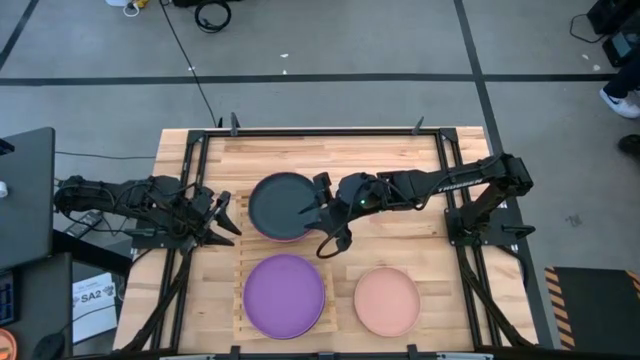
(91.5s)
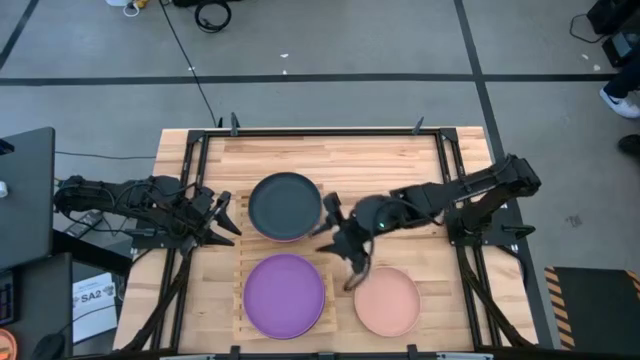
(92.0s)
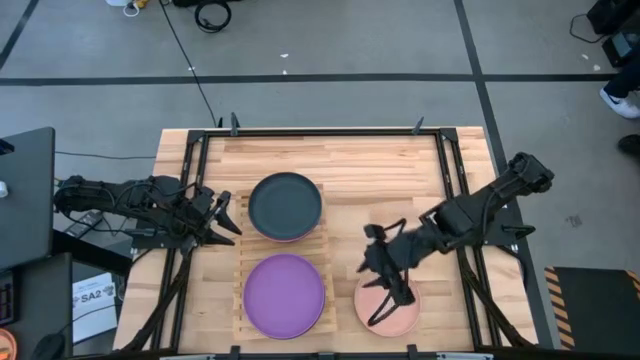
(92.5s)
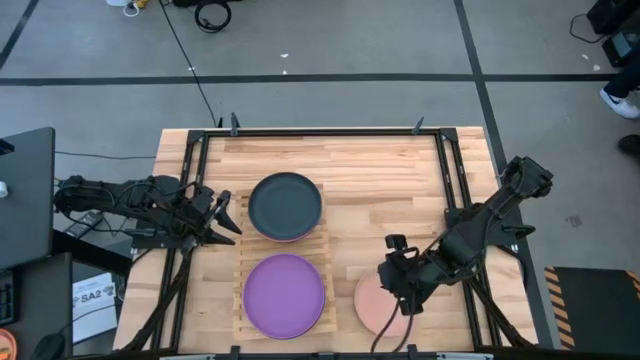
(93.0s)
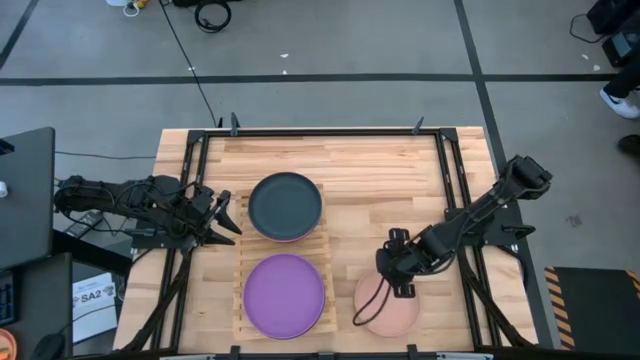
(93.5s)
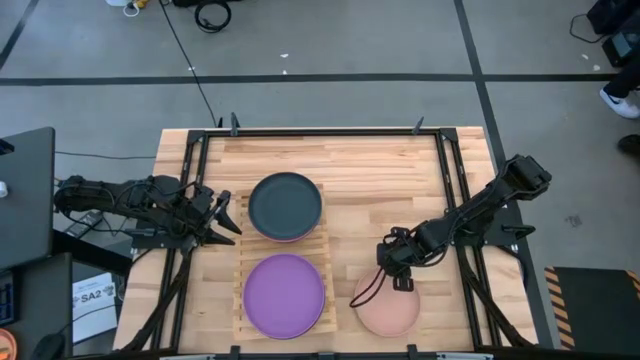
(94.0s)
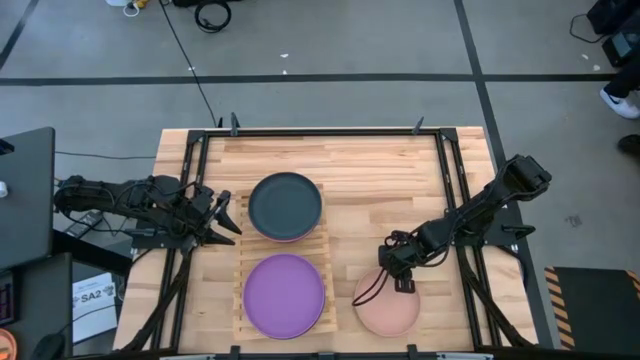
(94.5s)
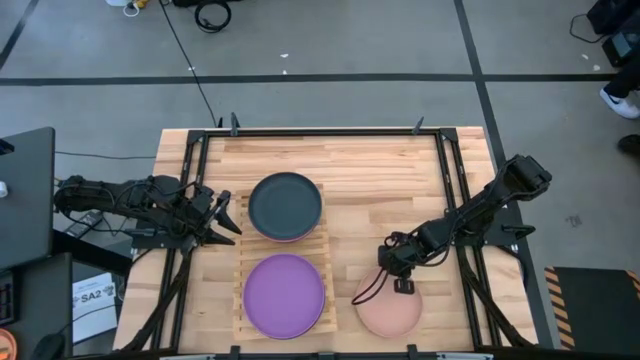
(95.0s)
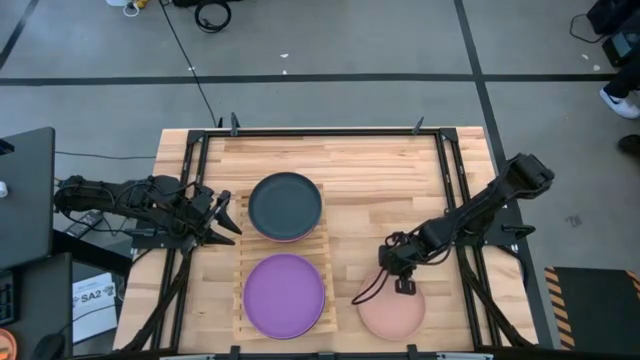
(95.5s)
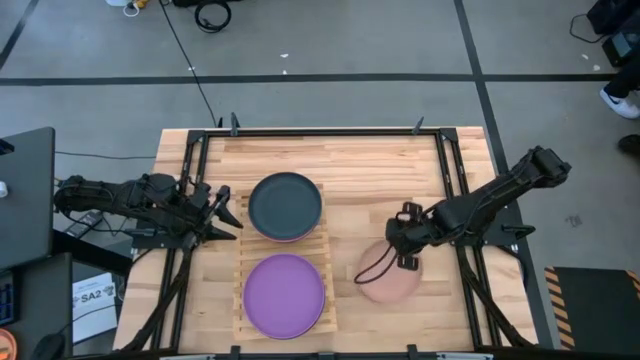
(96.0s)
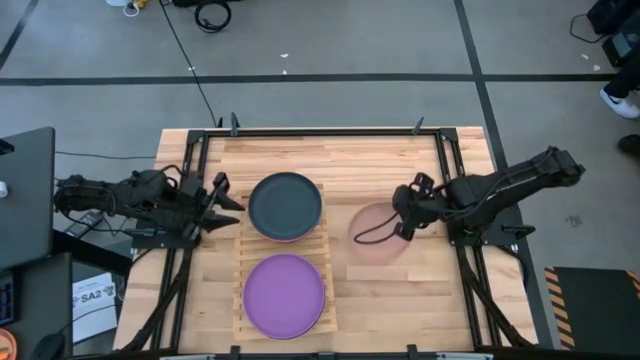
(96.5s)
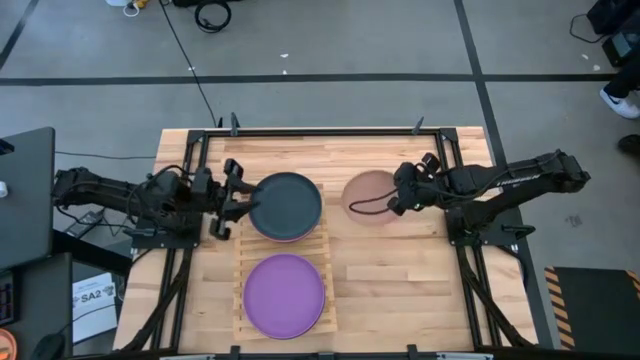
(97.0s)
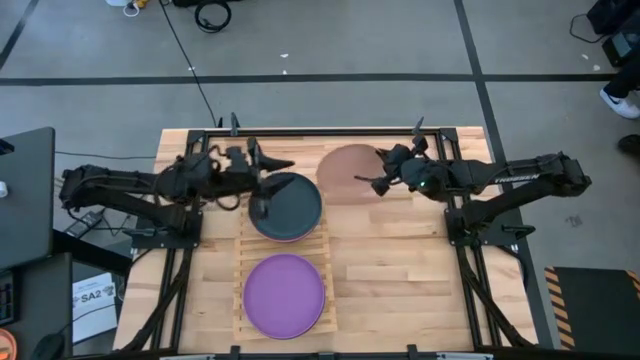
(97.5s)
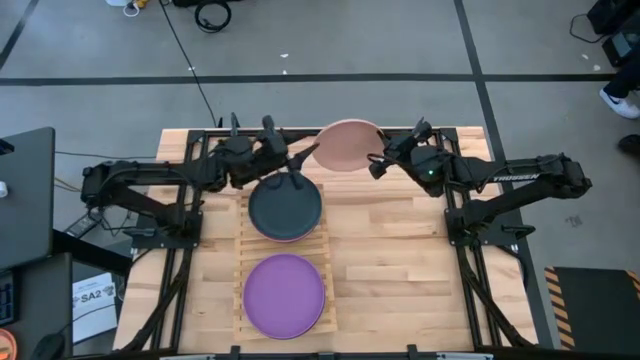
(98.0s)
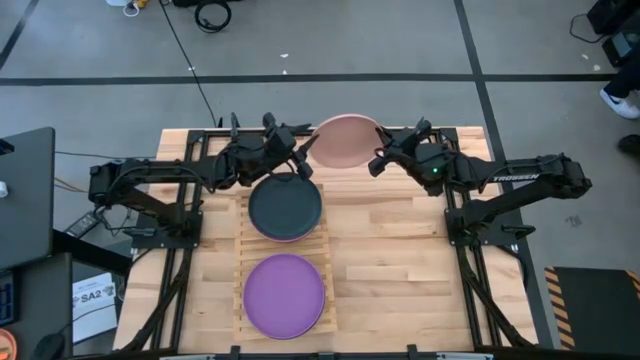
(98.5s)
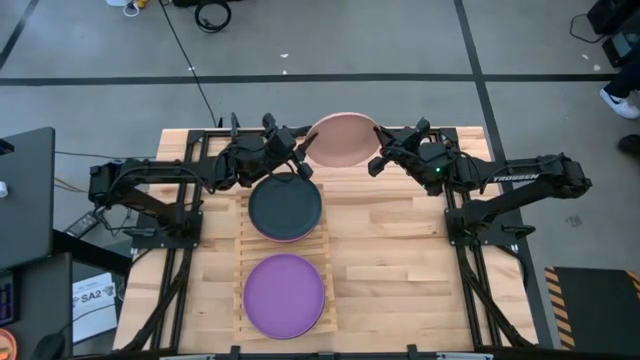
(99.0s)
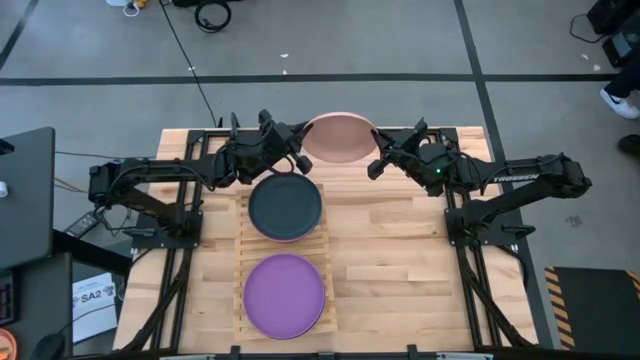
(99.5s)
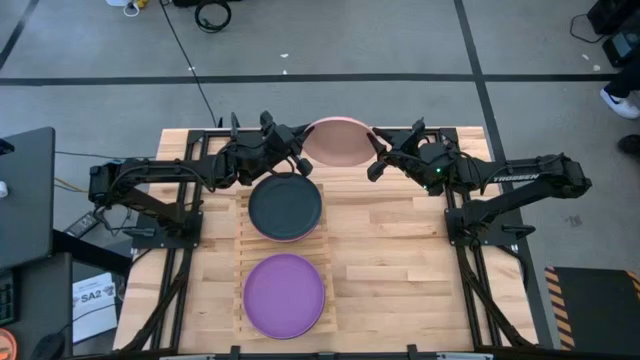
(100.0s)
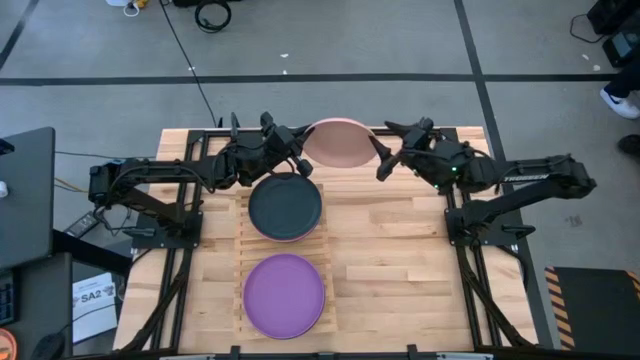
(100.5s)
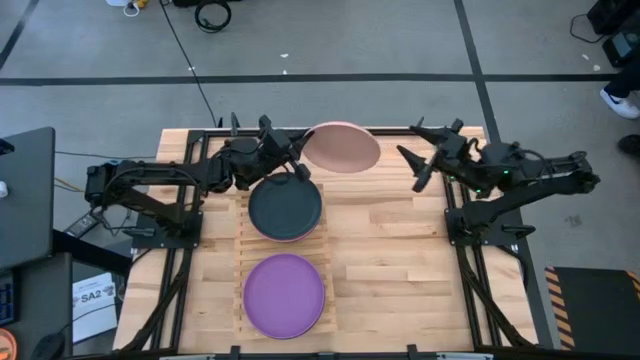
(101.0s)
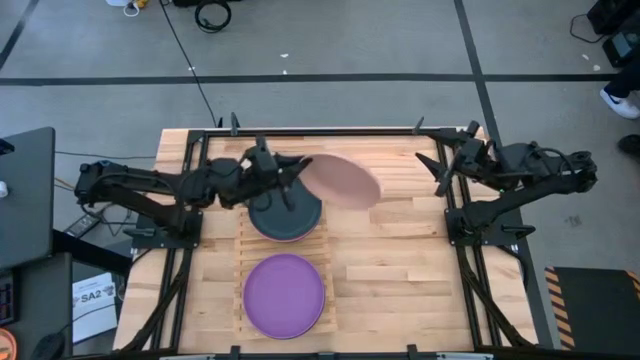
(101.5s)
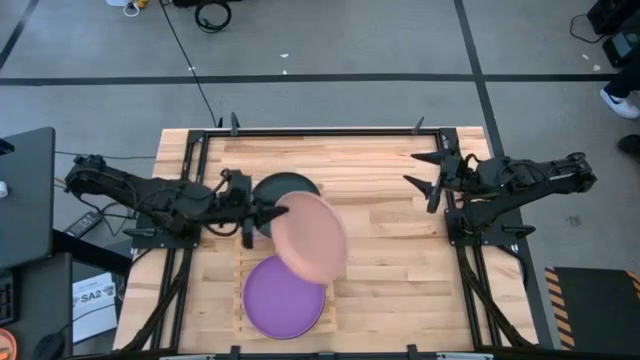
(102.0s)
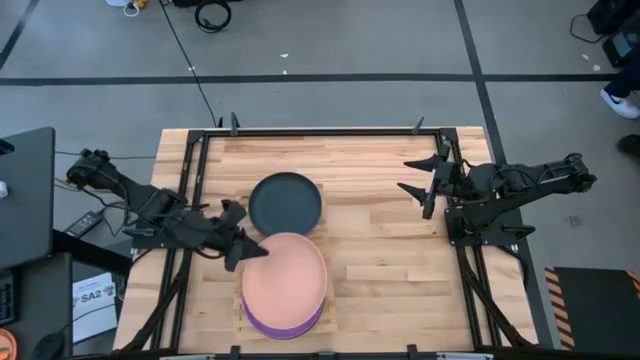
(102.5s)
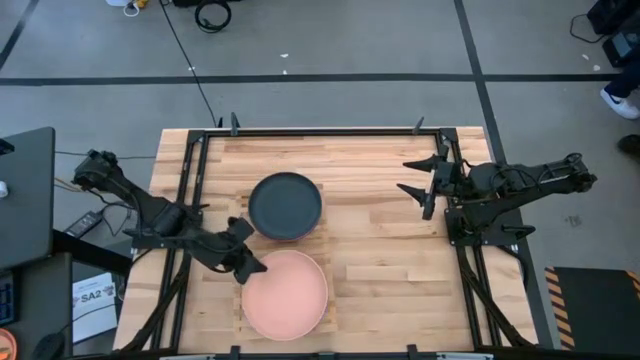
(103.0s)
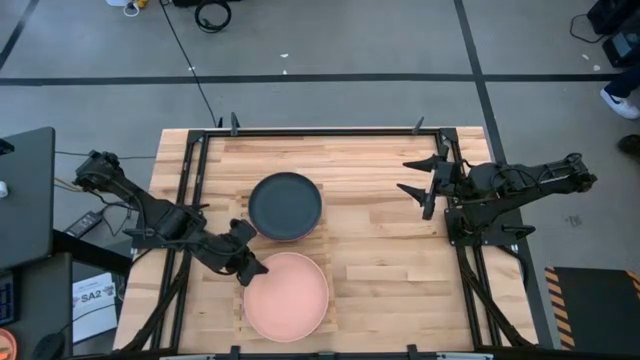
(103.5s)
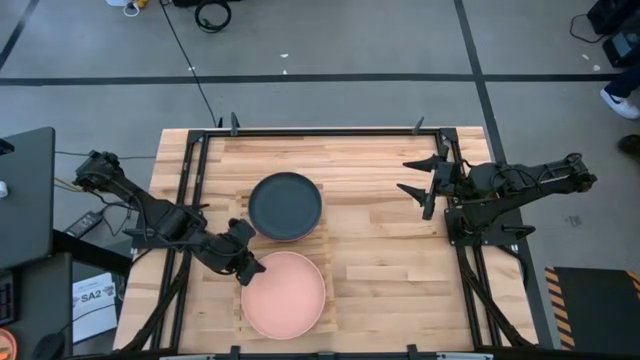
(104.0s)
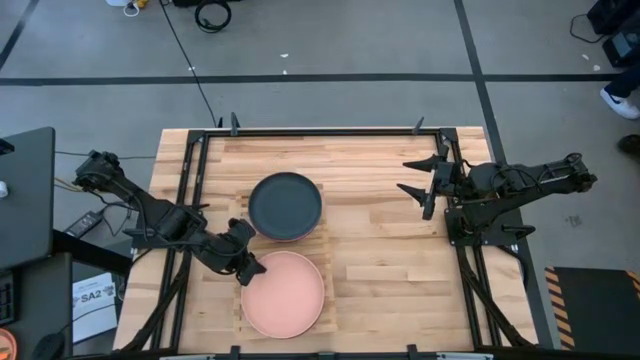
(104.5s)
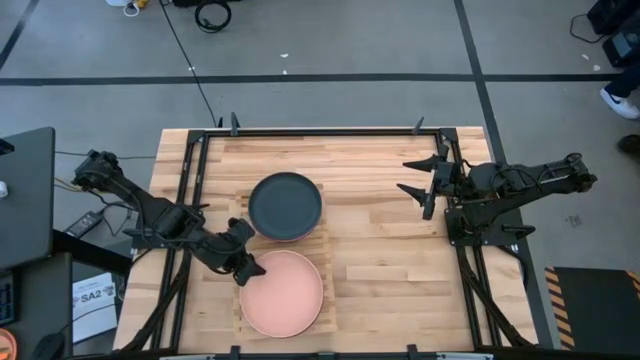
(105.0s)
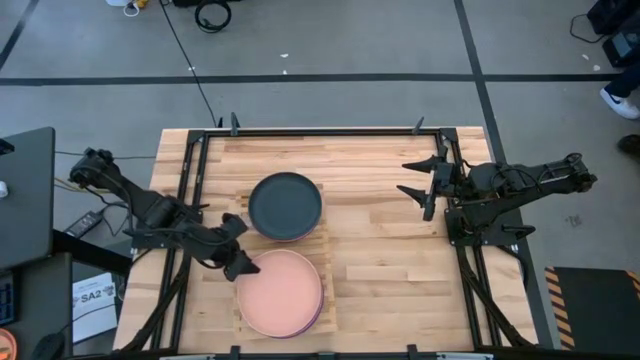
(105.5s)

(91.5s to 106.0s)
Task: Place and stack plates onto a shelf
Stack the brown plate on top of the violet plate on the shelf

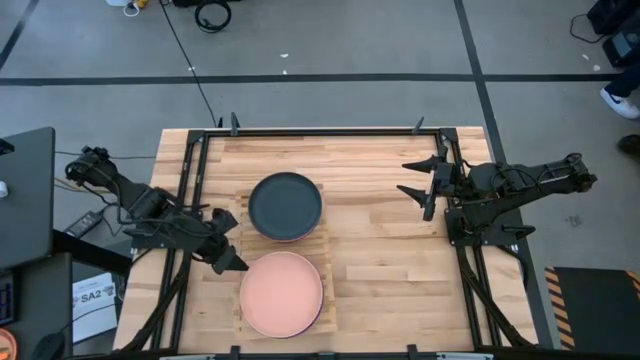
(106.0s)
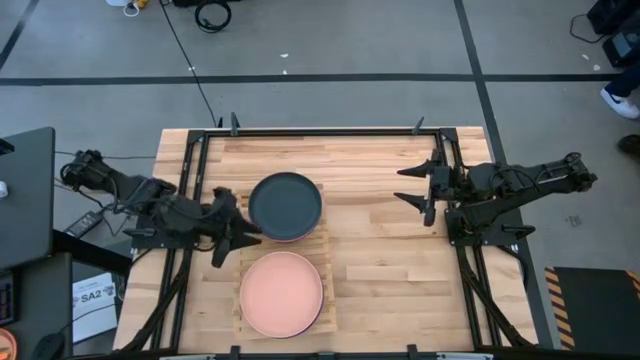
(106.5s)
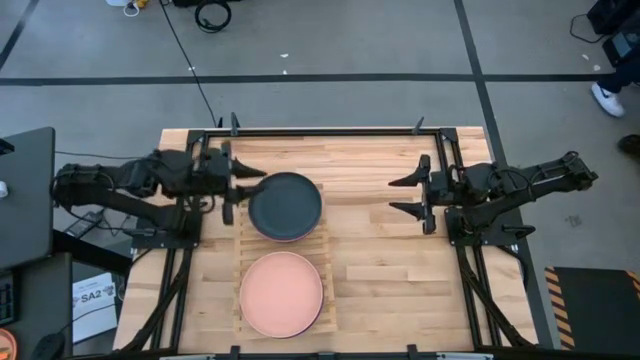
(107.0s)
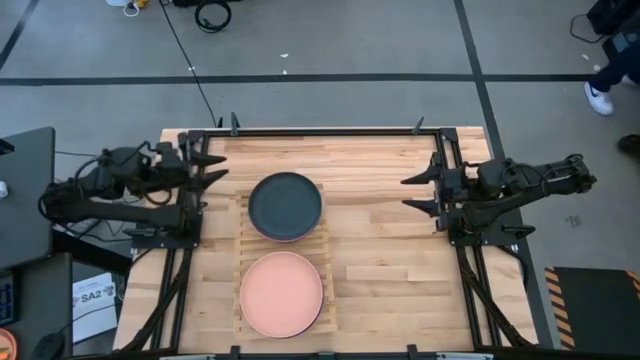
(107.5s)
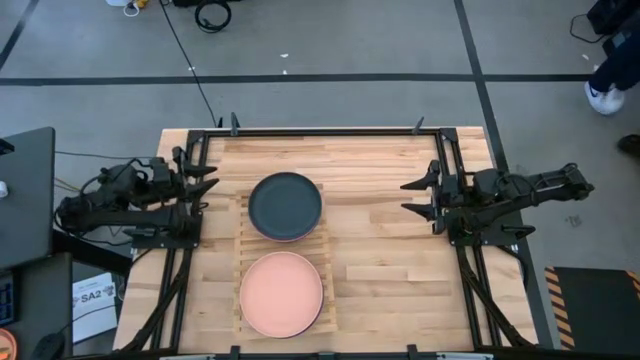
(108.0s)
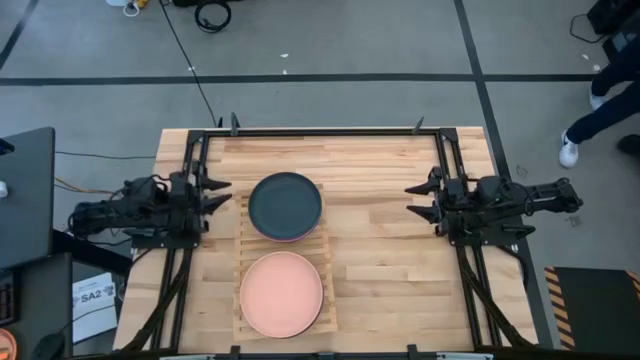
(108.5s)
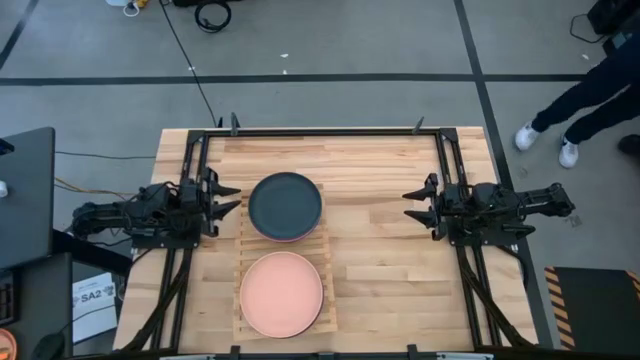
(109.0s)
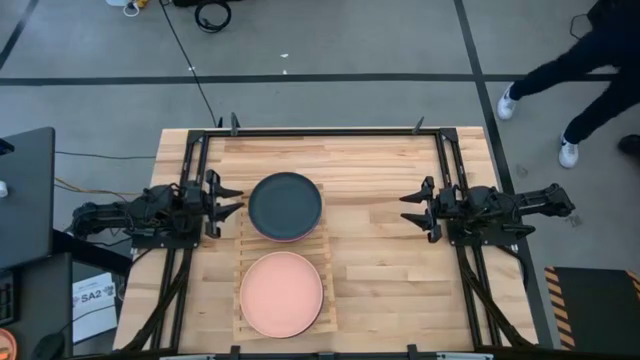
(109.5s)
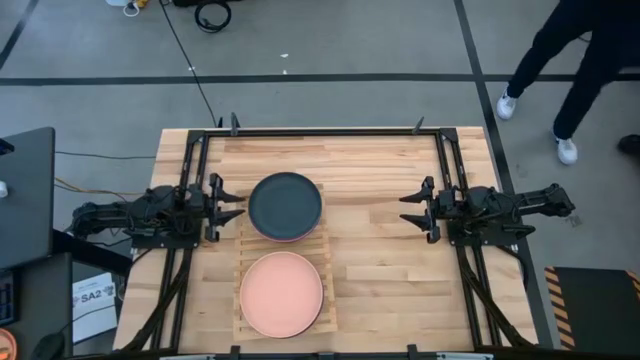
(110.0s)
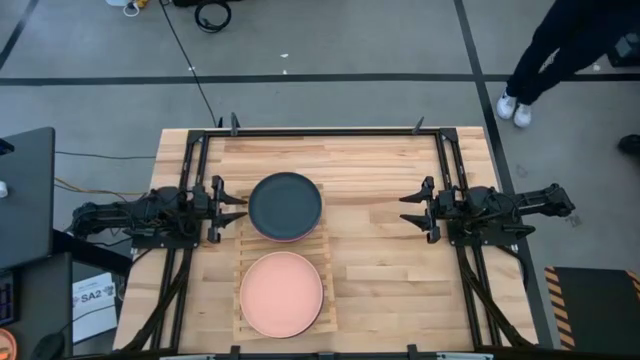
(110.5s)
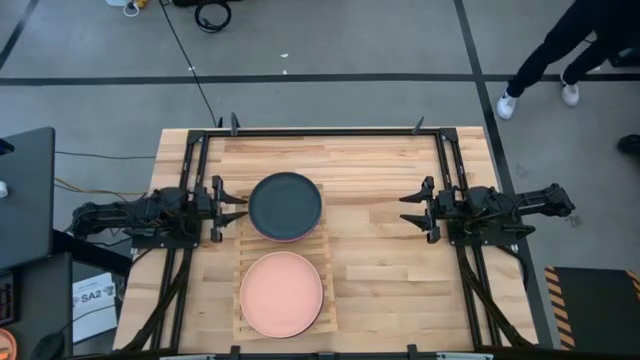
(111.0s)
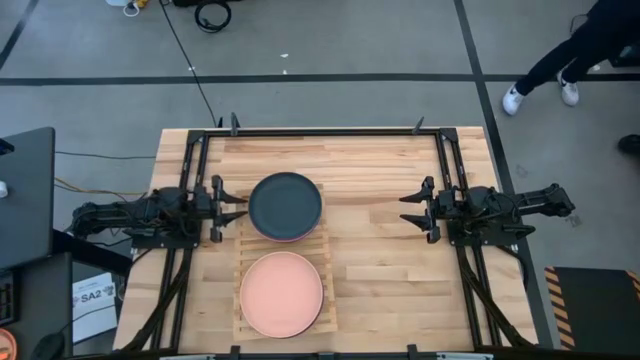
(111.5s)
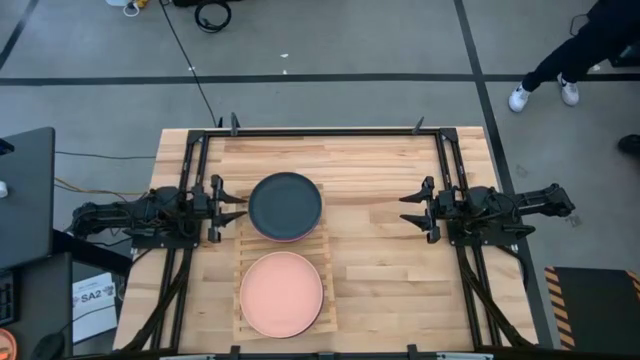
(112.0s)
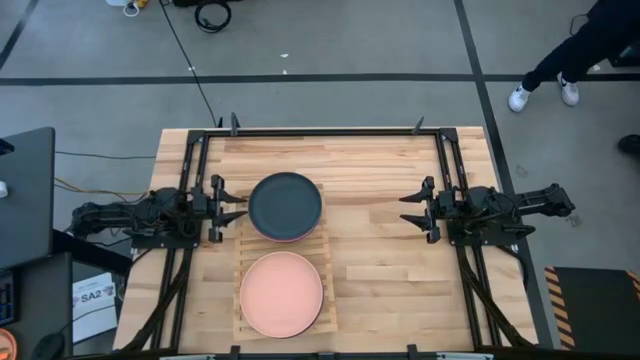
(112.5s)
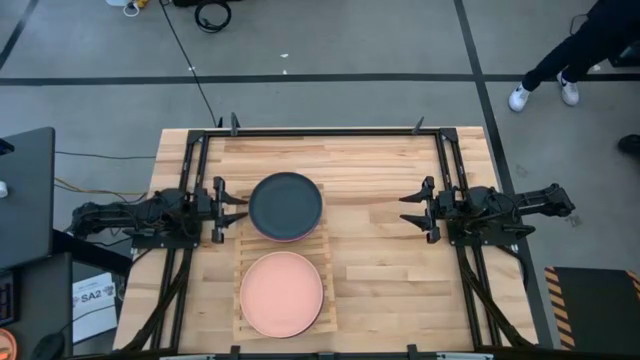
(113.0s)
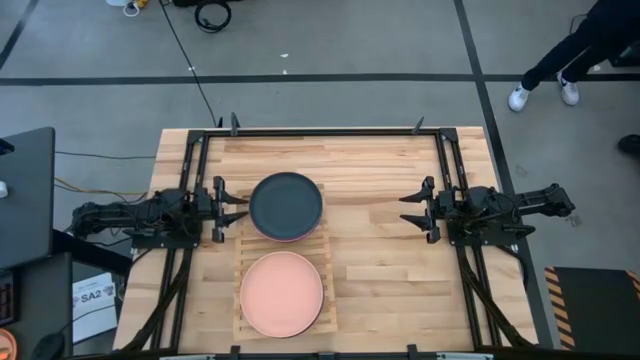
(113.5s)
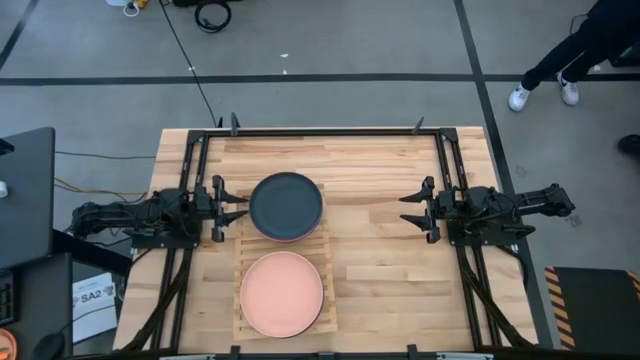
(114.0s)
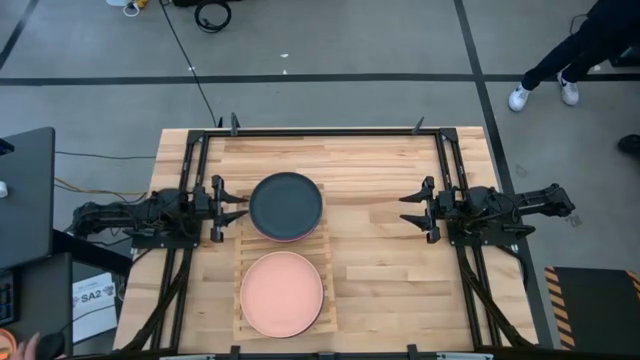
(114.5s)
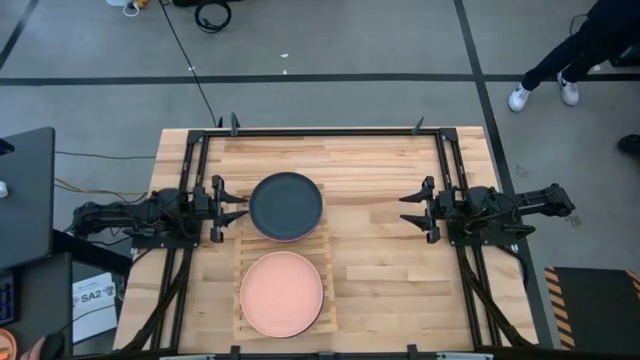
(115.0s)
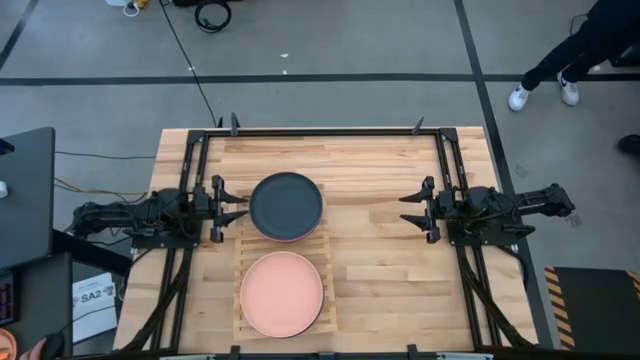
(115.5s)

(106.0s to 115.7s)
Return to Home Position
